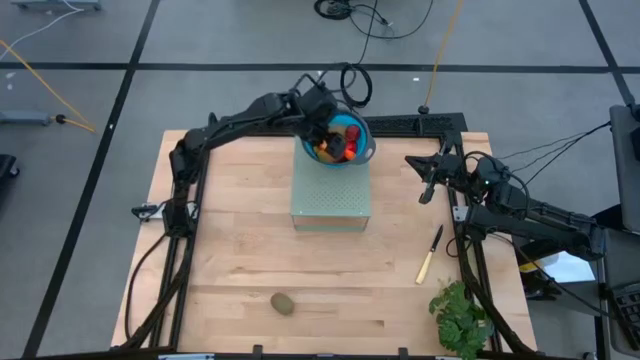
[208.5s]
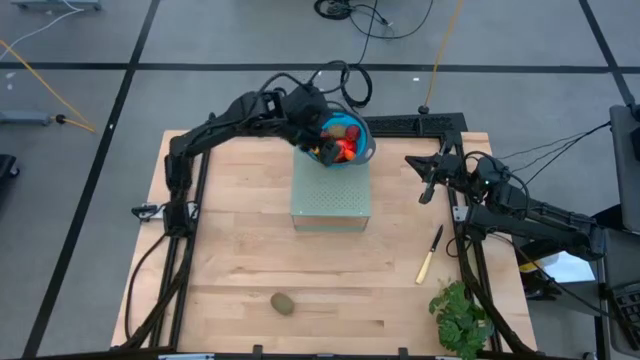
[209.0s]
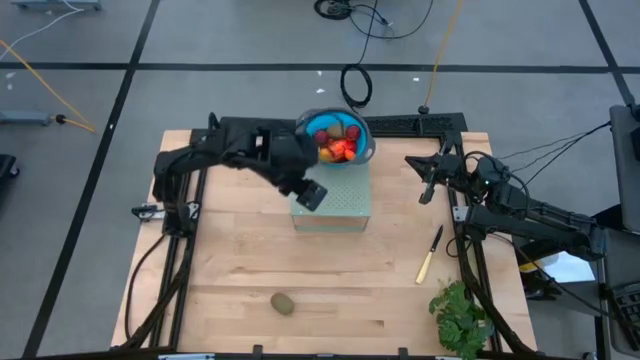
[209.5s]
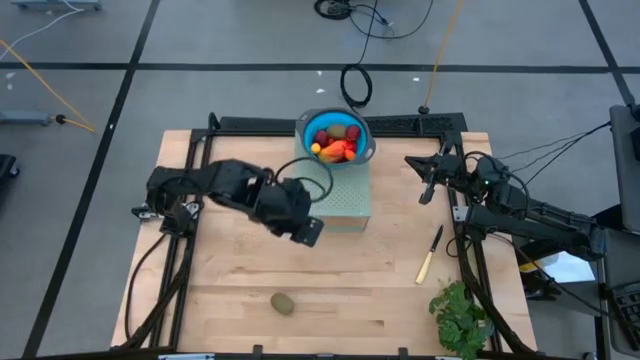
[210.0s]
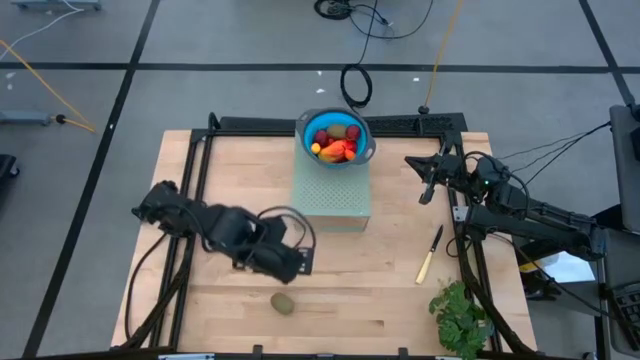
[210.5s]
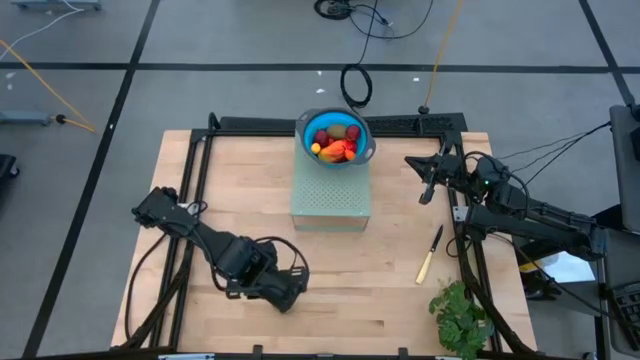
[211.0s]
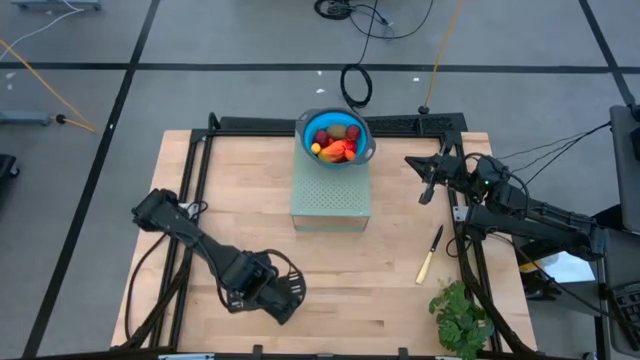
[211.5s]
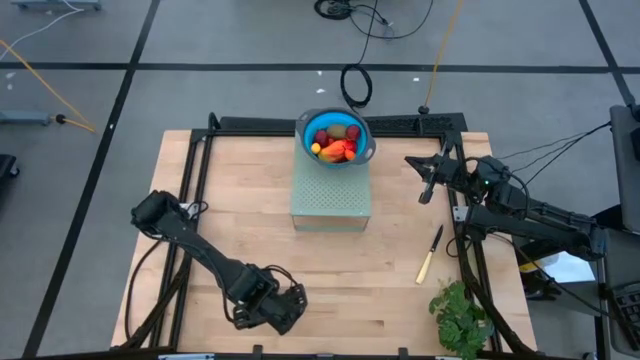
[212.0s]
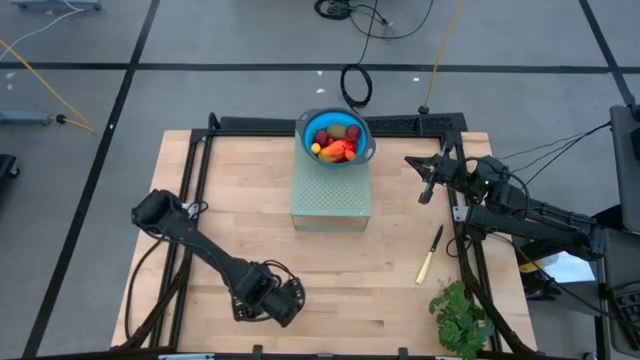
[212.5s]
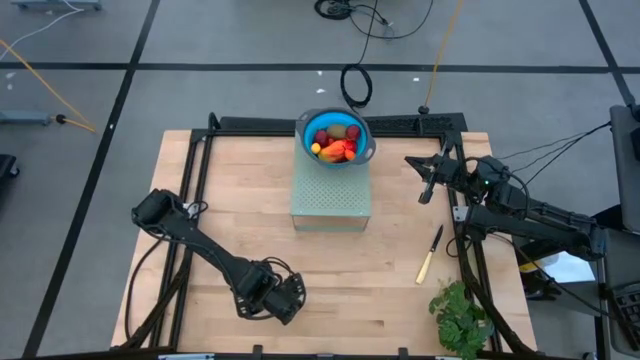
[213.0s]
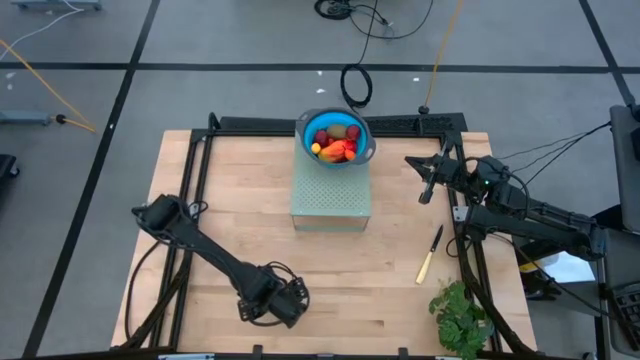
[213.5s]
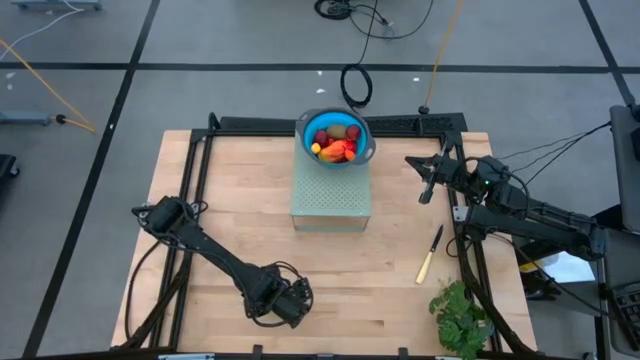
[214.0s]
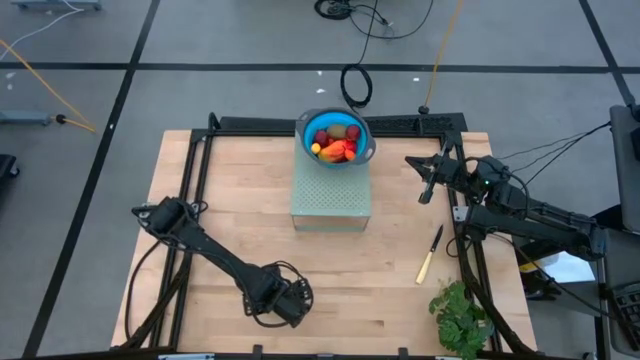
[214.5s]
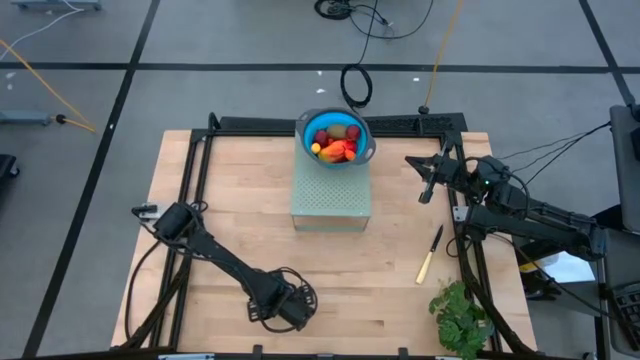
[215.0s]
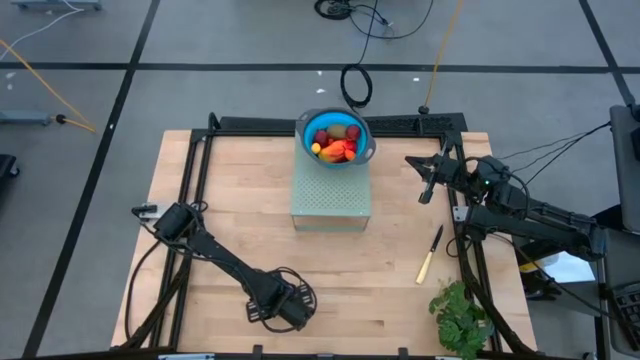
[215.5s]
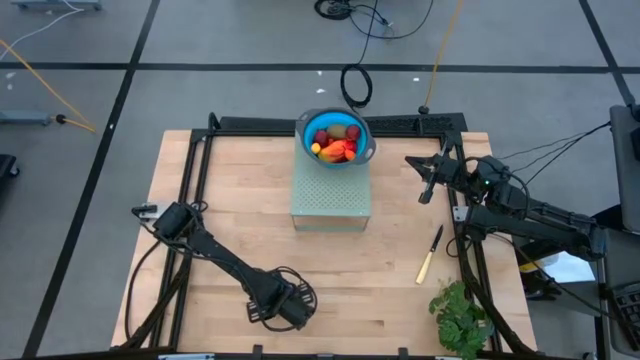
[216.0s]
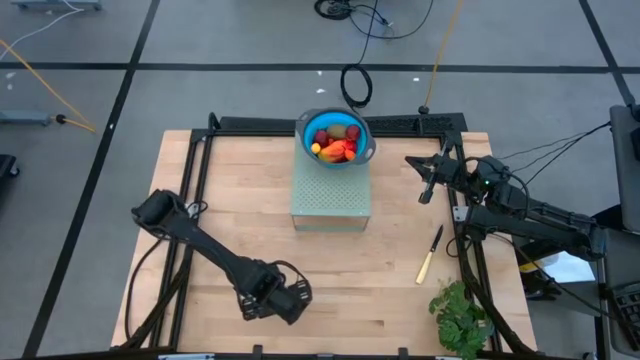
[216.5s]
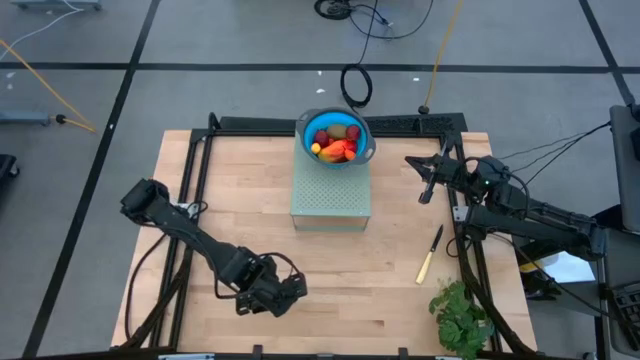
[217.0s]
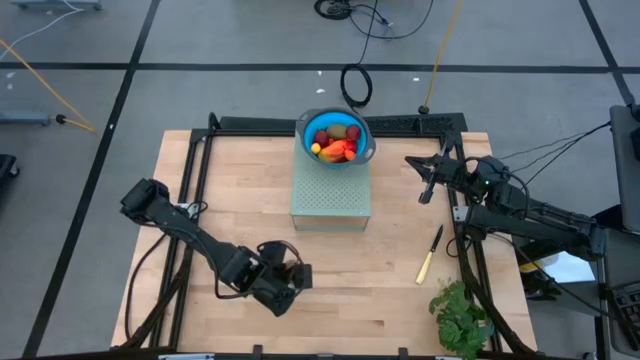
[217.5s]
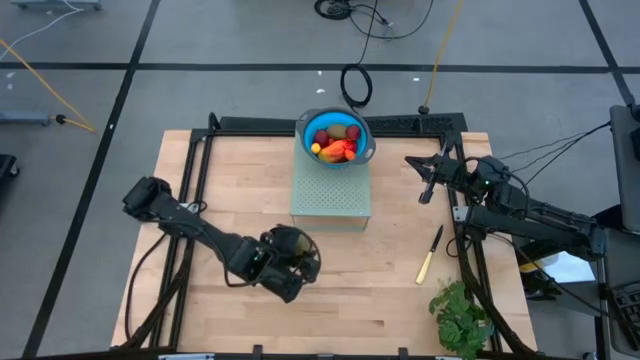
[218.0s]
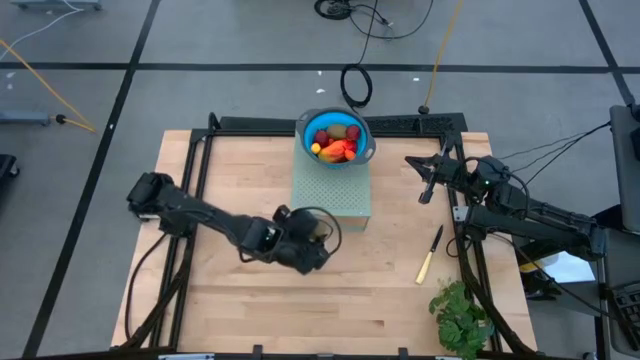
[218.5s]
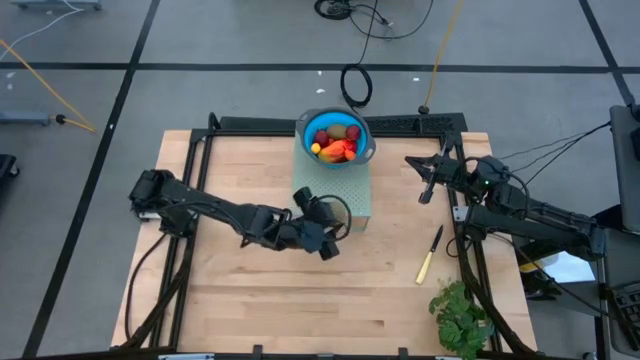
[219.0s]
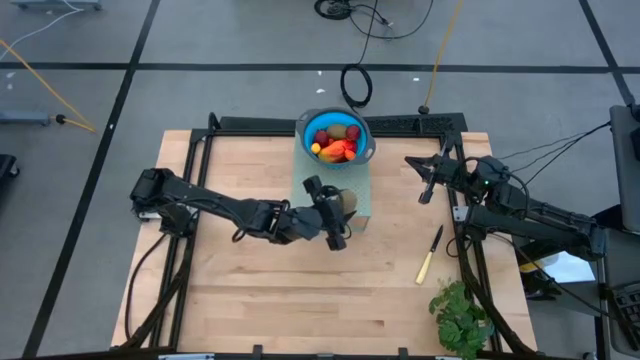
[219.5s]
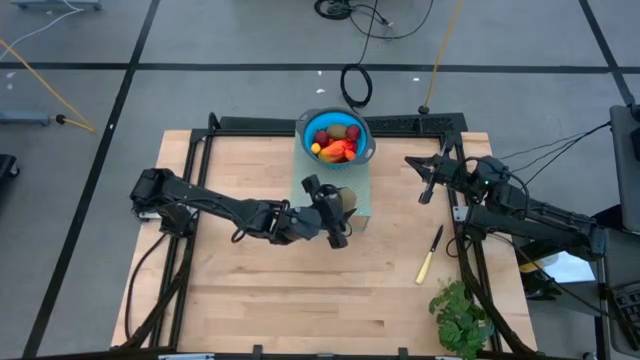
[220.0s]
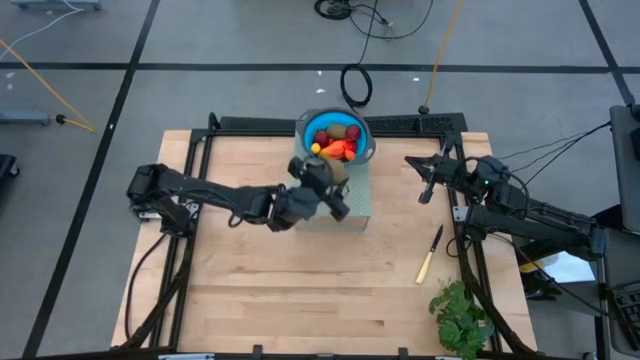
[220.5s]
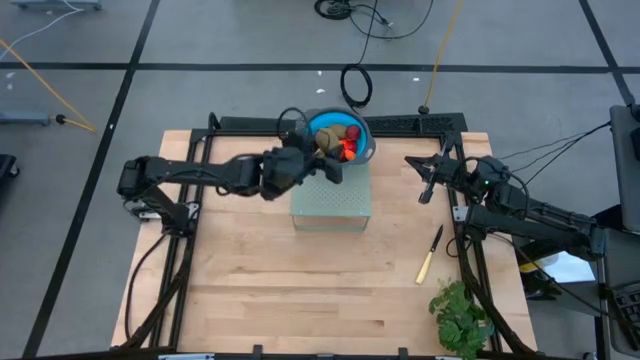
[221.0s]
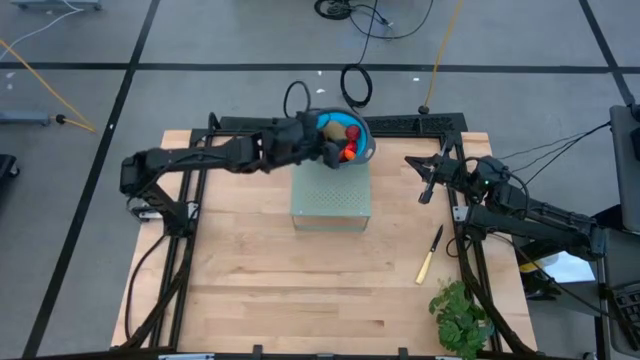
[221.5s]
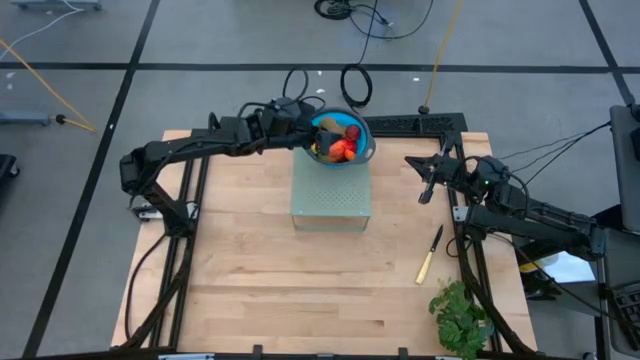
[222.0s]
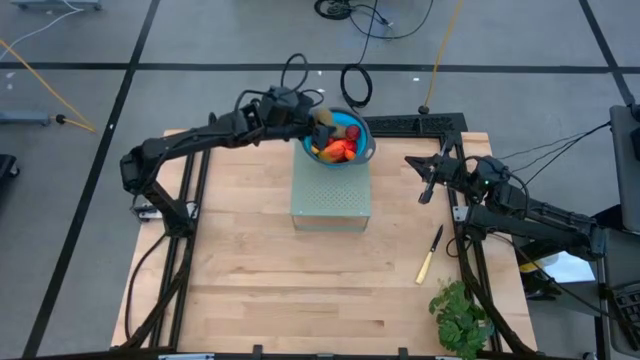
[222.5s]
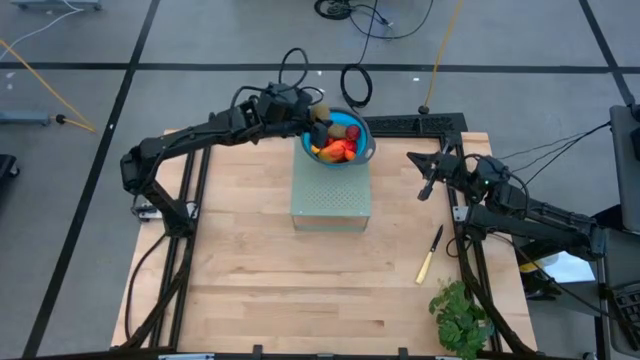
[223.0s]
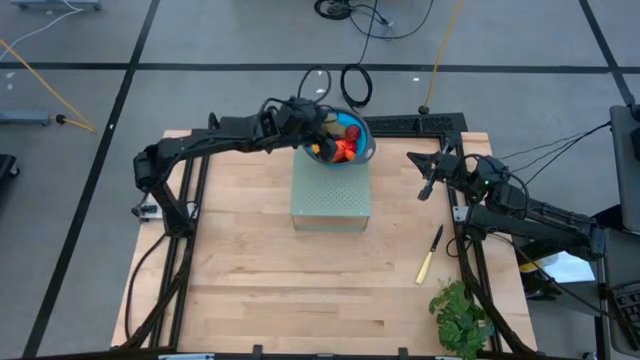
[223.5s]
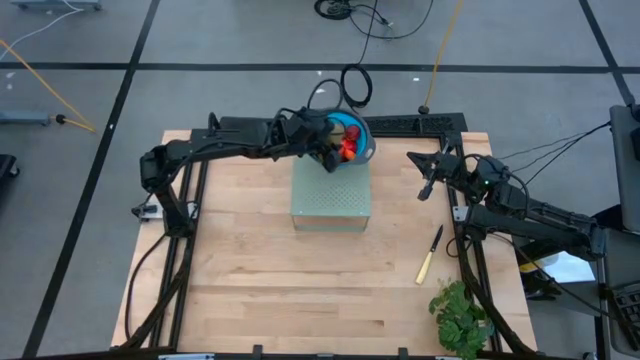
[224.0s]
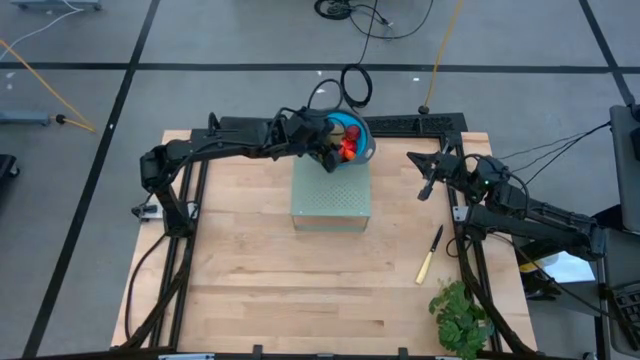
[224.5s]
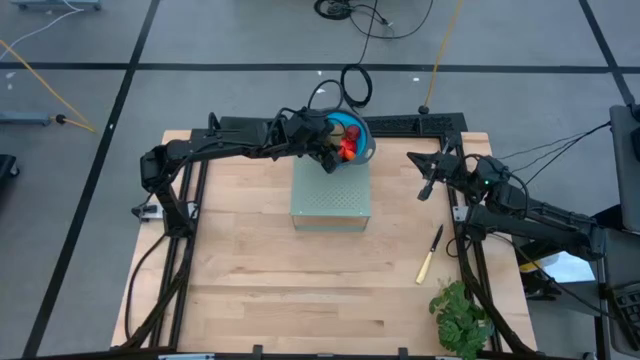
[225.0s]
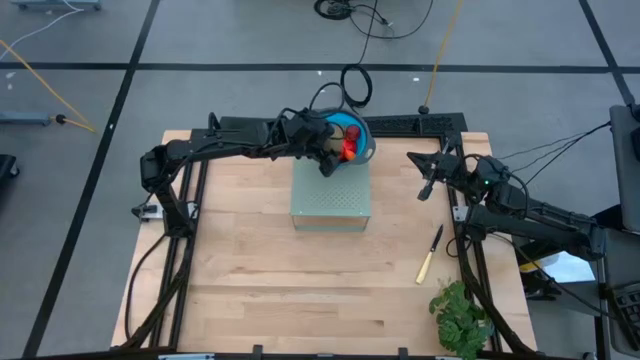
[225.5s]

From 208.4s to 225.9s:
Task: Pick & Place Fruit
Put the kiwi into the blue strainer bowl on the shelf

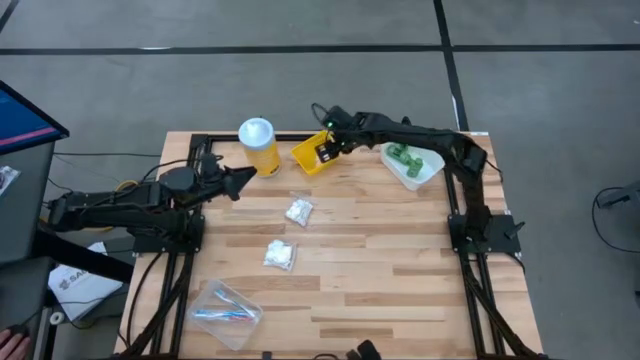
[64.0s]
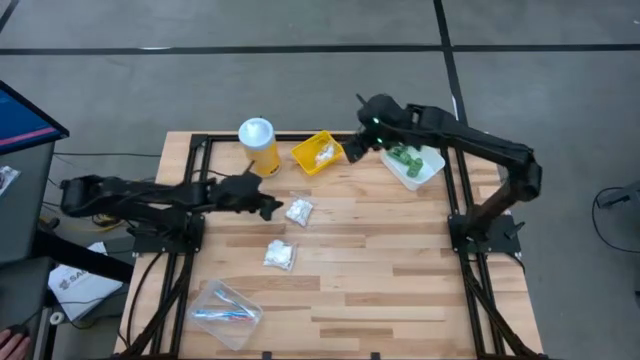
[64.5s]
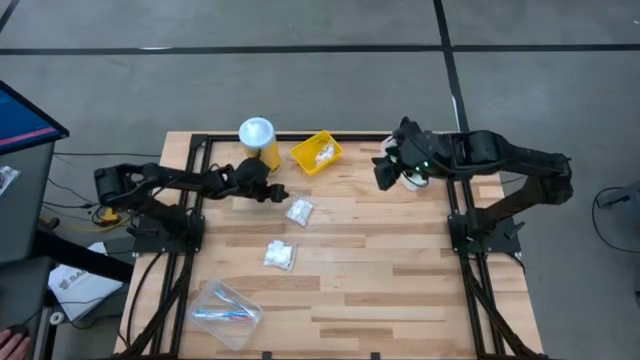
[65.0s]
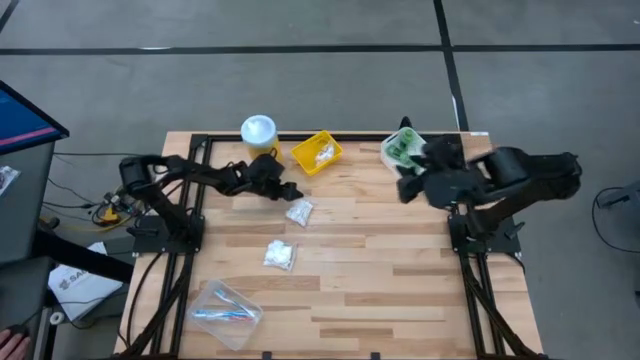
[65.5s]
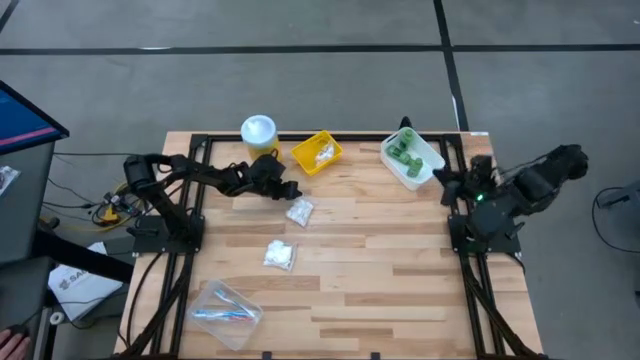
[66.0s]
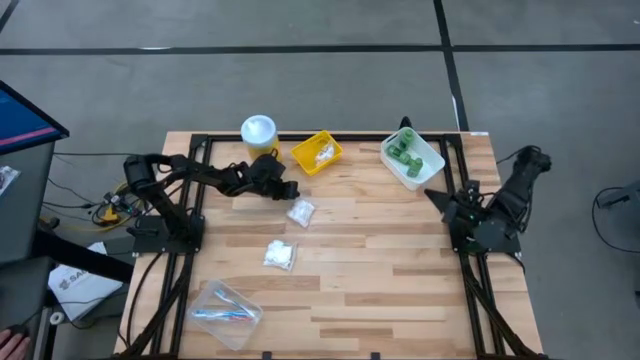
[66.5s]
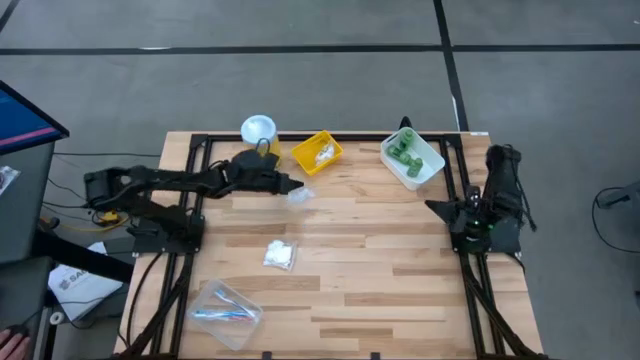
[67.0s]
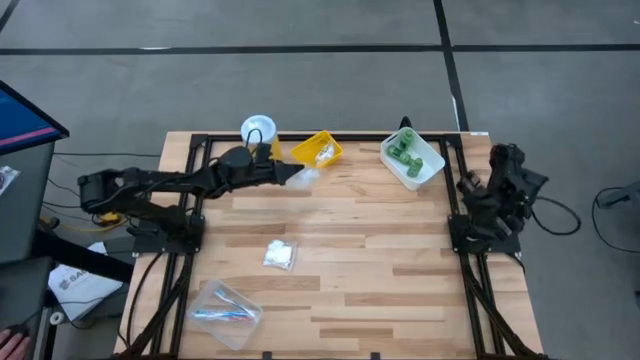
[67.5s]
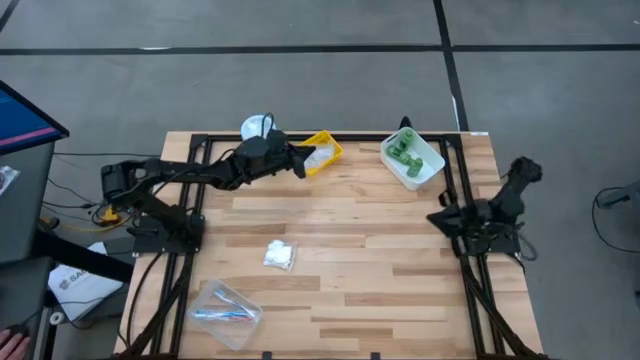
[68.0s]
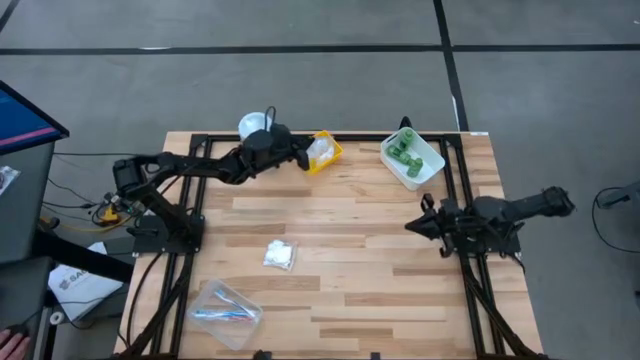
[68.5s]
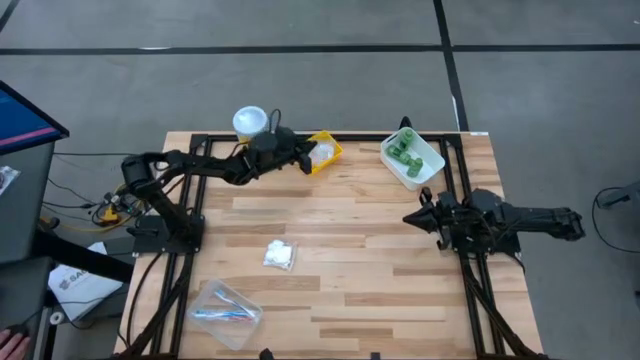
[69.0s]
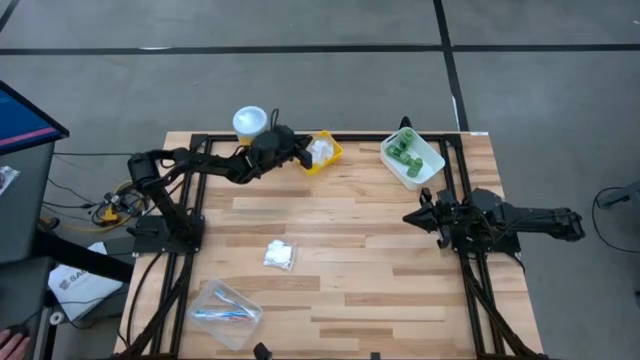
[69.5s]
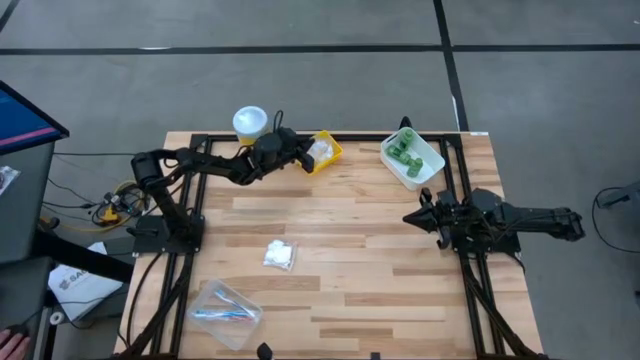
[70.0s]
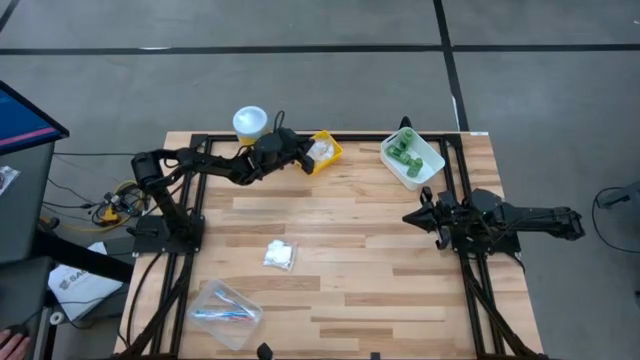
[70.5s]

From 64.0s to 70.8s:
Task: Pick & Place Travel size toiletries
Put the cotton pack into the yellow bin
